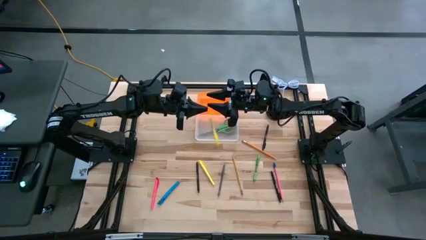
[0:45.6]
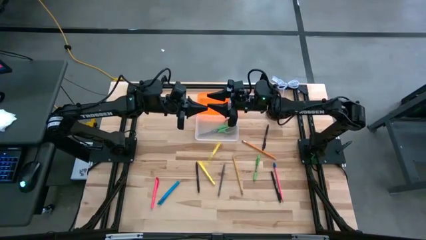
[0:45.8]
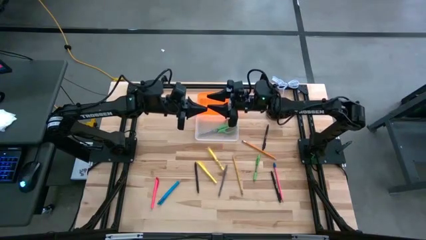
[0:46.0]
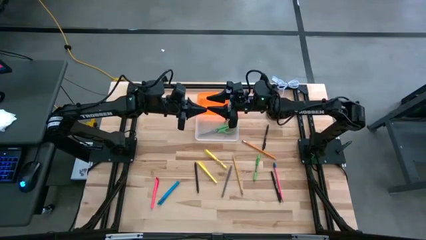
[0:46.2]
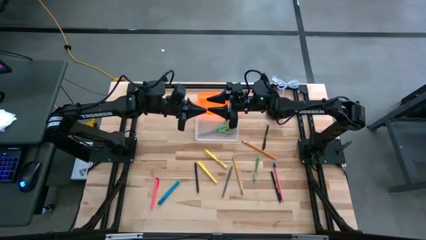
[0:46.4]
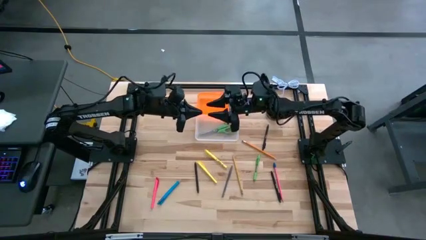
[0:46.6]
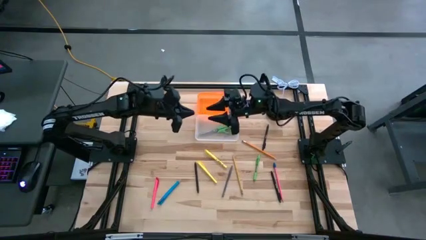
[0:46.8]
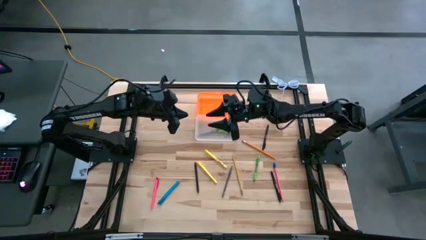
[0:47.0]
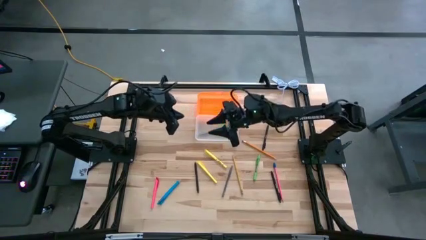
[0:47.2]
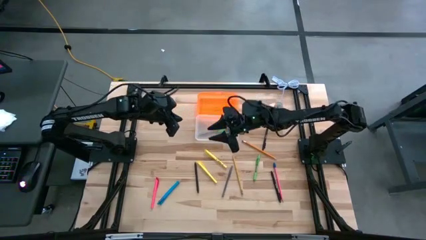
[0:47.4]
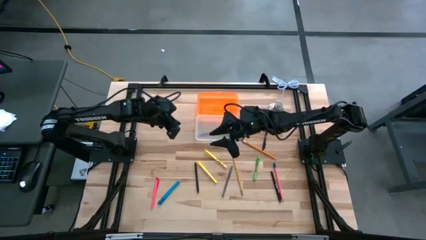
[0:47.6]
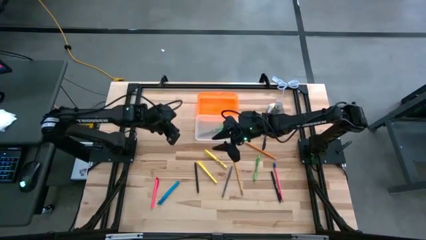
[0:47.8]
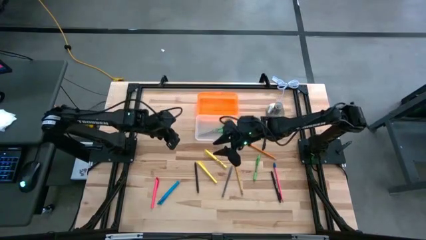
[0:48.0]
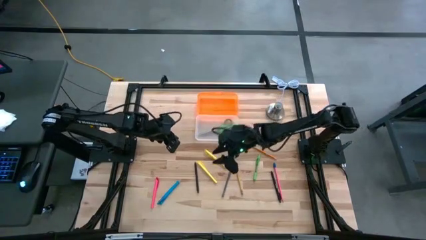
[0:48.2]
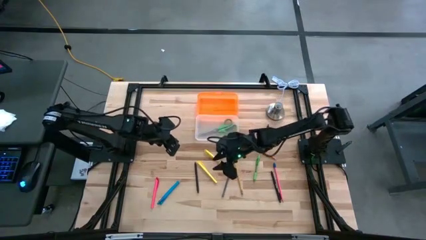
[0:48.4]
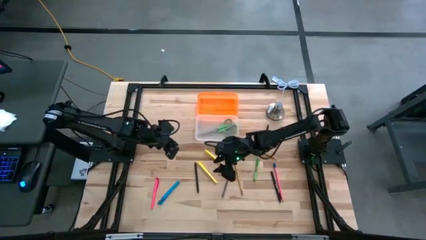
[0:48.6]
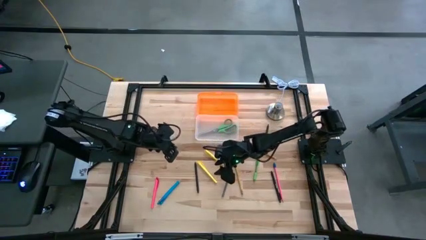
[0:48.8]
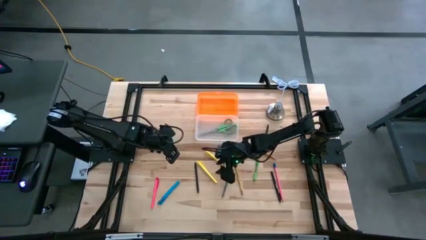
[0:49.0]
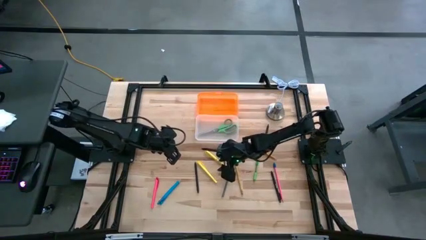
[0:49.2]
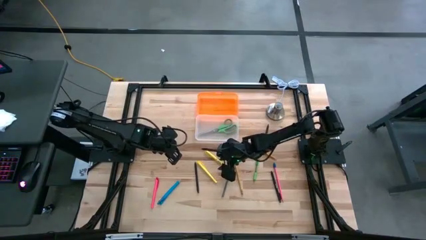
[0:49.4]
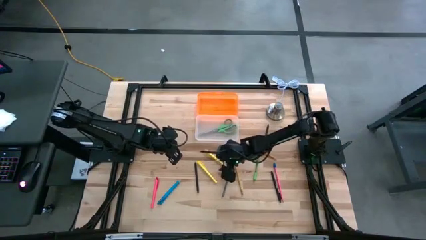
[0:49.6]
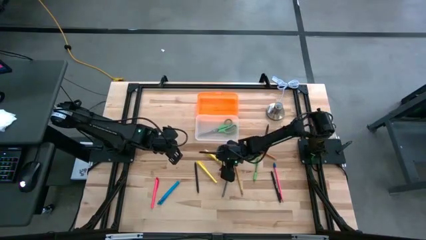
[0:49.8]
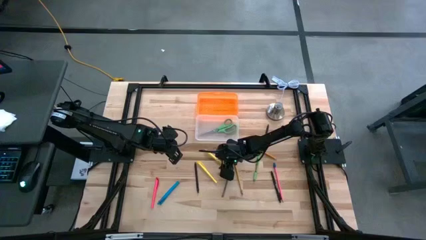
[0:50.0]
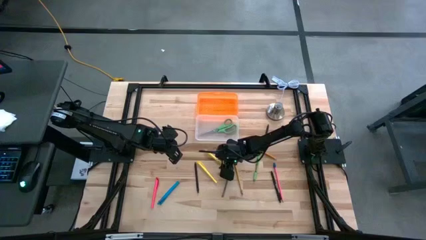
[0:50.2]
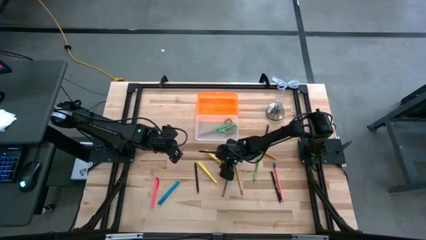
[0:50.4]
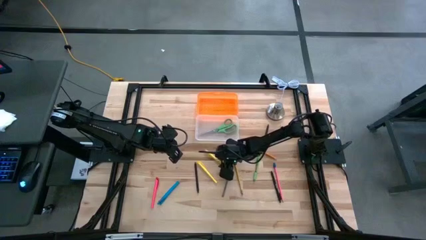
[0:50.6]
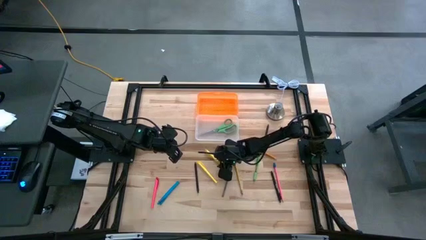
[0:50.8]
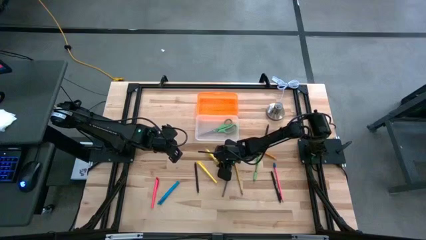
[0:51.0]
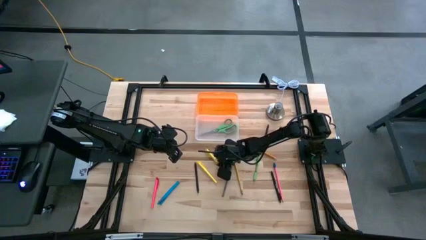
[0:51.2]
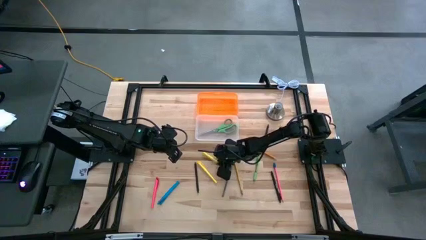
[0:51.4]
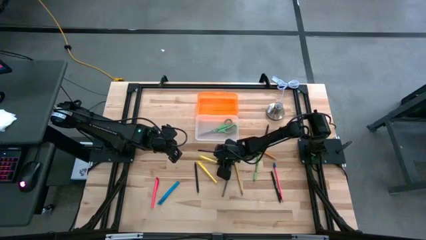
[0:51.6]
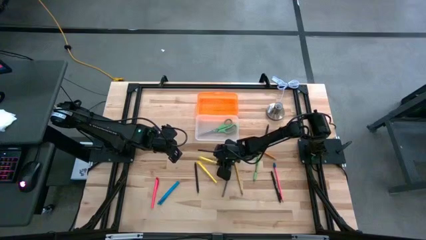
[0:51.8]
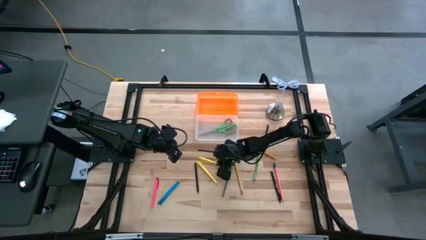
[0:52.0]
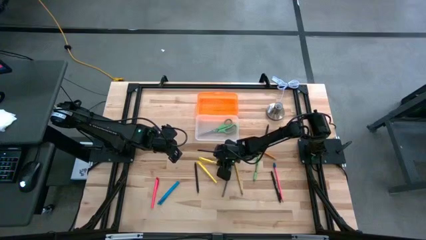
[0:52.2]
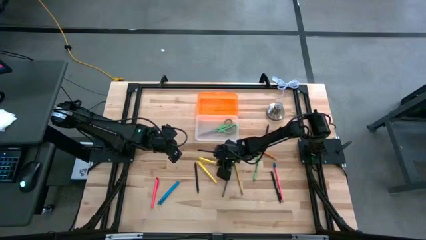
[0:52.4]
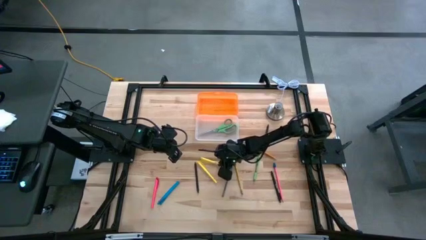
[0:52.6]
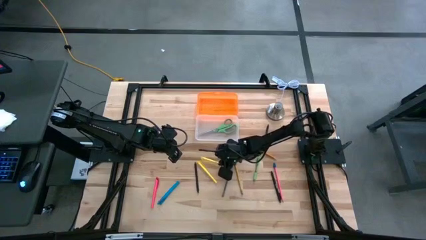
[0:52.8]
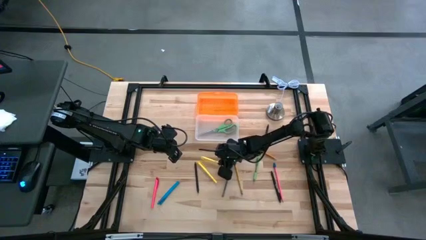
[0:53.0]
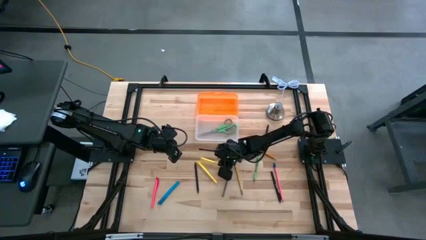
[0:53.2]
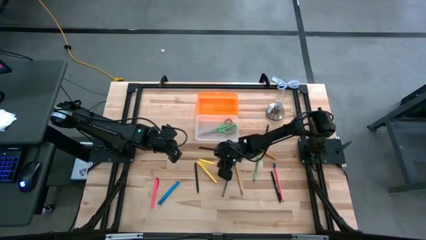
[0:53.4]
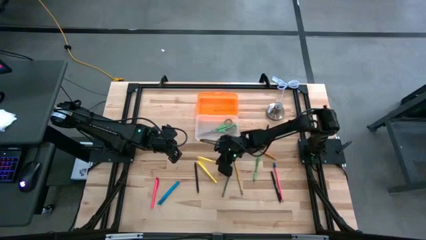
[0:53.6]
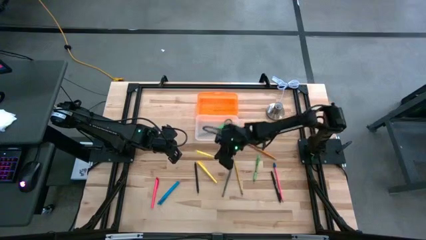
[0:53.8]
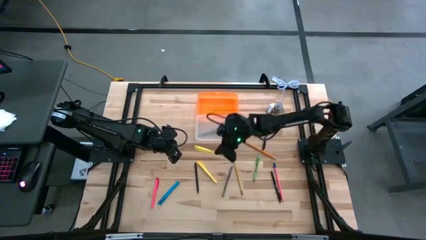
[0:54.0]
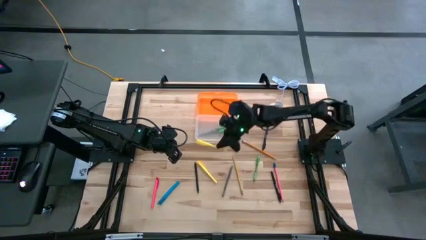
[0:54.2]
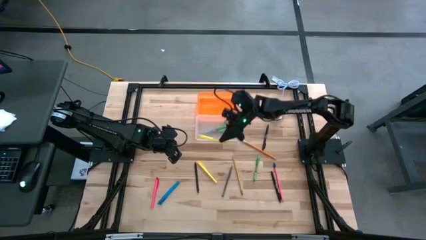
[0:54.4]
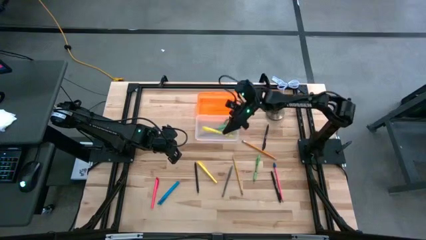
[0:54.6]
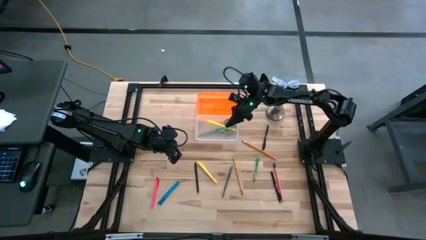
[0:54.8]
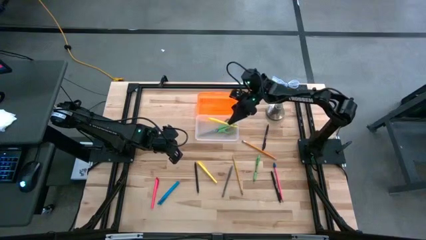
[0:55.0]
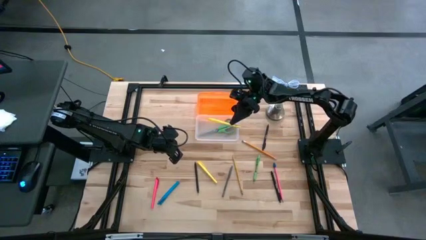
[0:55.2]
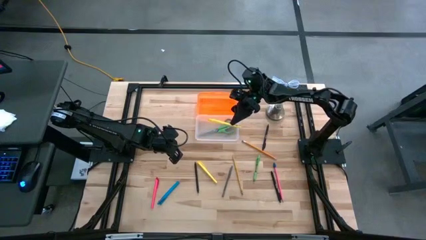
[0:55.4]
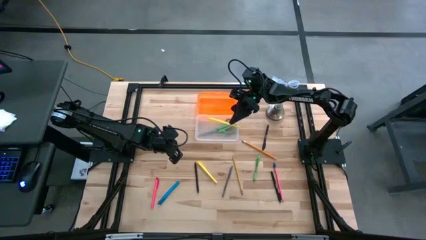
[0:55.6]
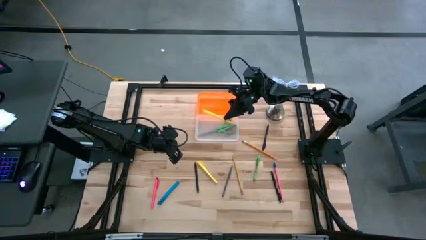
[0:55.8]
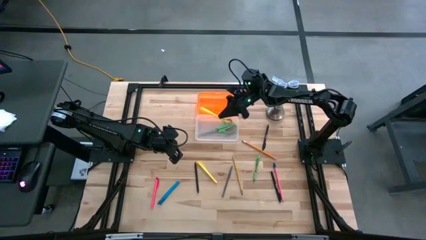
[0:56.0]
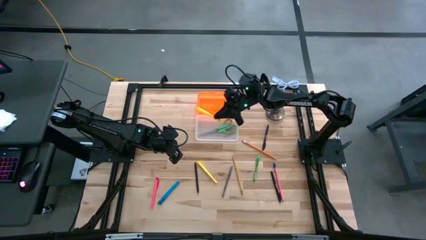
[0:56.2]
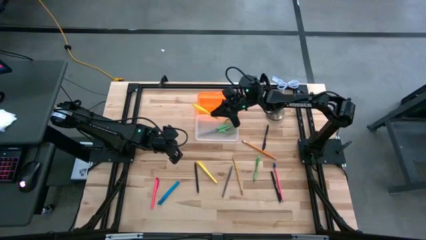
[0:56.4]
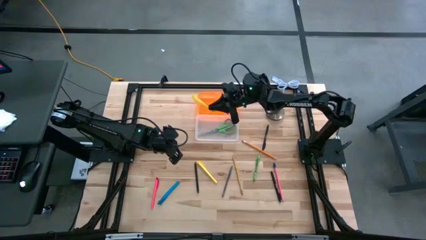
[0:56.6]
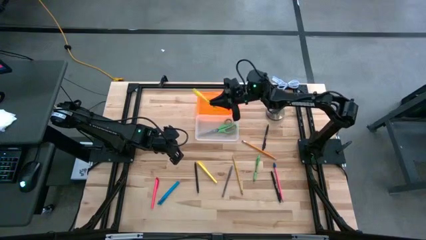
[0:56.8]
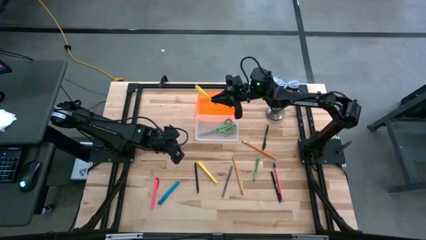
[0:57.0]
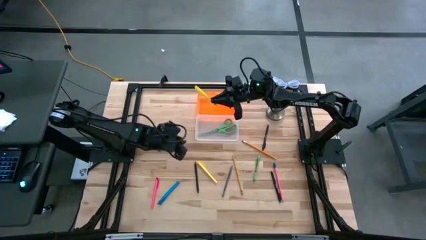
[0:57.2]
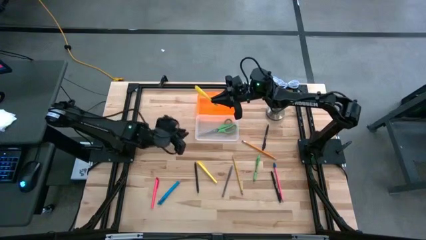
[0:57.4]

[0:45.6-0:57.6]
Task: Pick & place school supplies into a supply box
Put the top yellow pen into the orange supply box

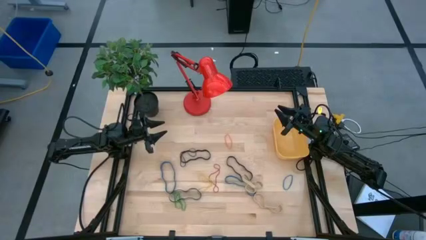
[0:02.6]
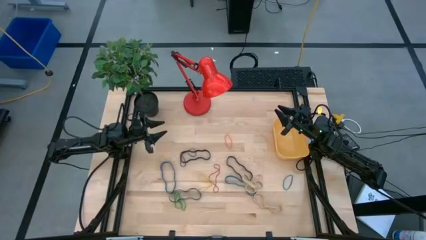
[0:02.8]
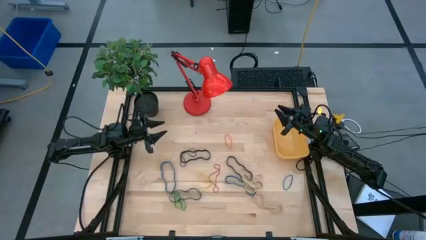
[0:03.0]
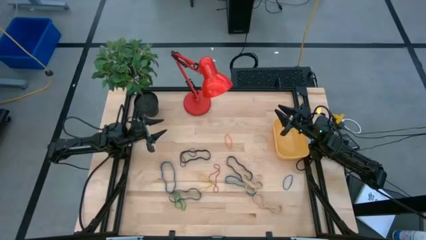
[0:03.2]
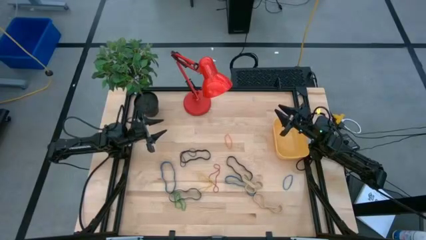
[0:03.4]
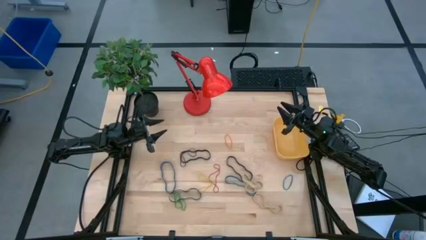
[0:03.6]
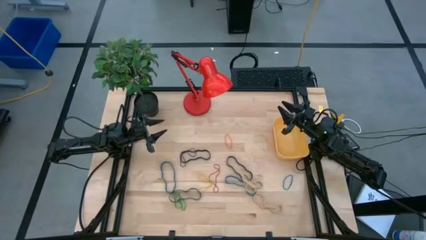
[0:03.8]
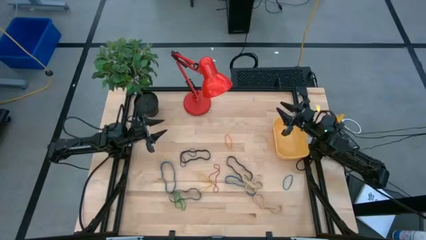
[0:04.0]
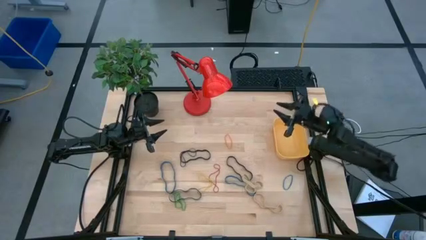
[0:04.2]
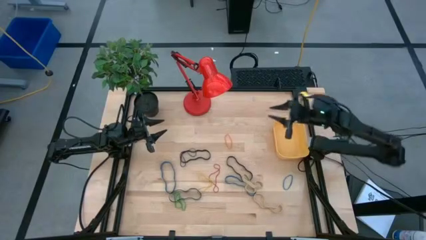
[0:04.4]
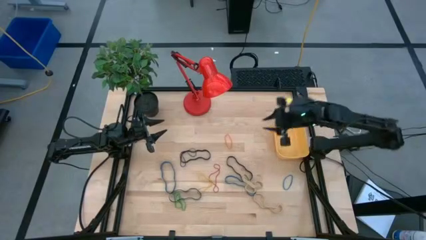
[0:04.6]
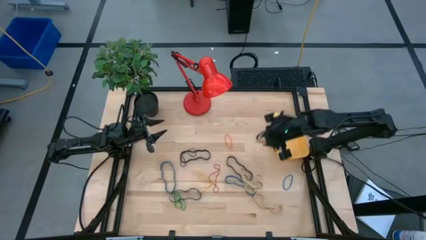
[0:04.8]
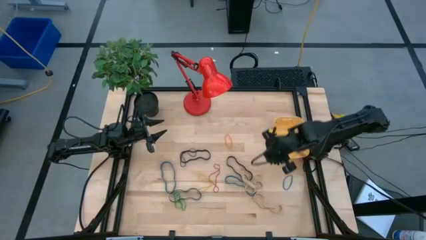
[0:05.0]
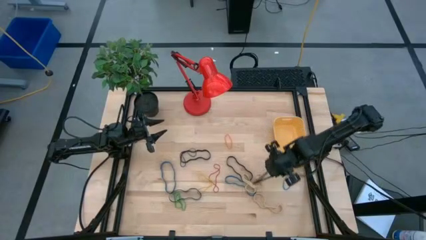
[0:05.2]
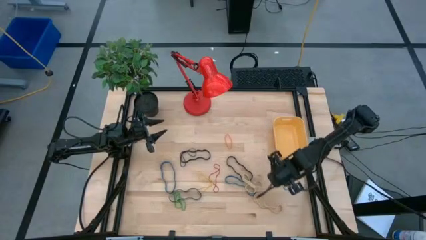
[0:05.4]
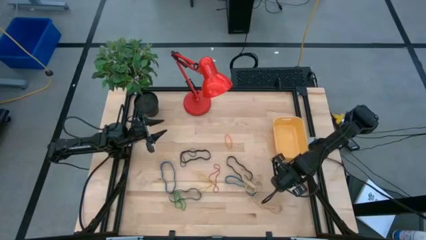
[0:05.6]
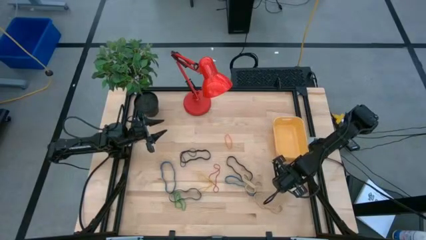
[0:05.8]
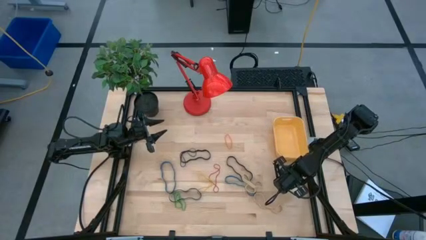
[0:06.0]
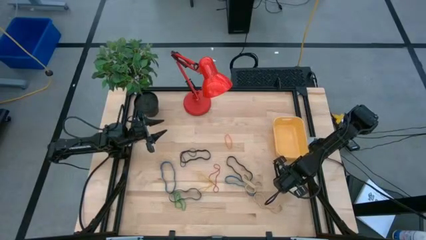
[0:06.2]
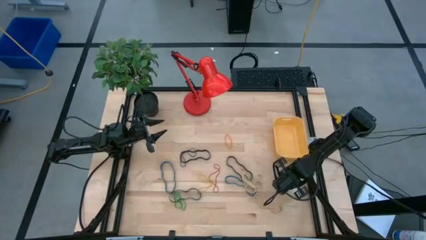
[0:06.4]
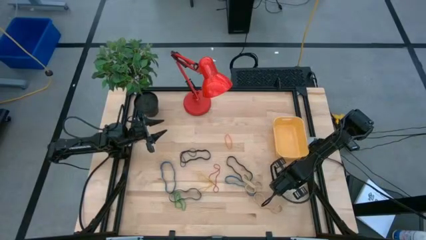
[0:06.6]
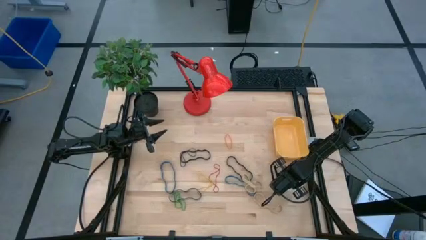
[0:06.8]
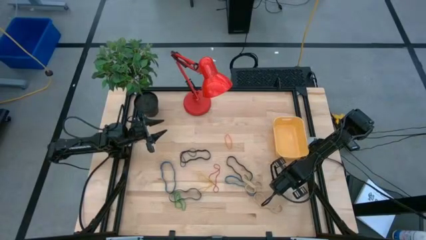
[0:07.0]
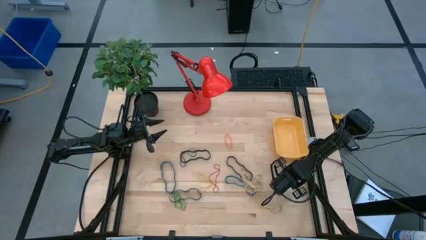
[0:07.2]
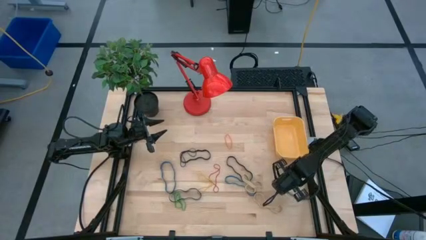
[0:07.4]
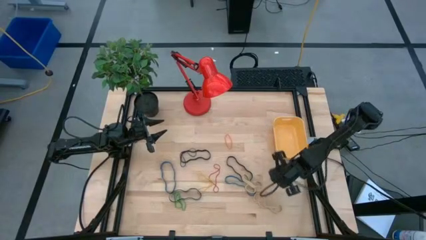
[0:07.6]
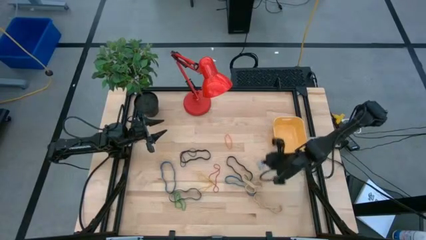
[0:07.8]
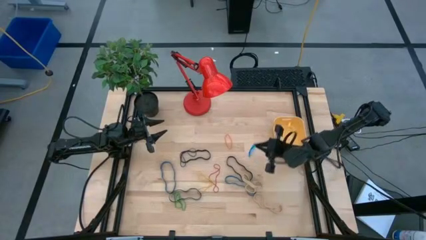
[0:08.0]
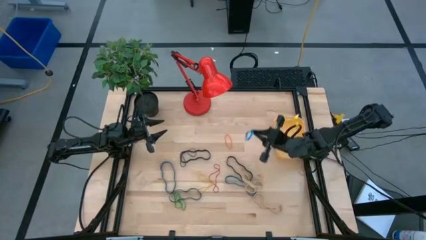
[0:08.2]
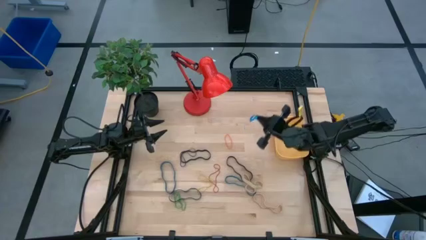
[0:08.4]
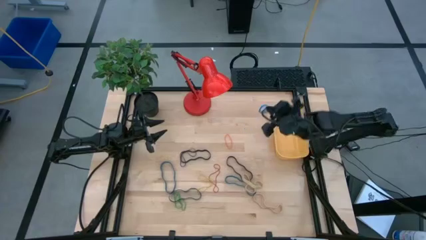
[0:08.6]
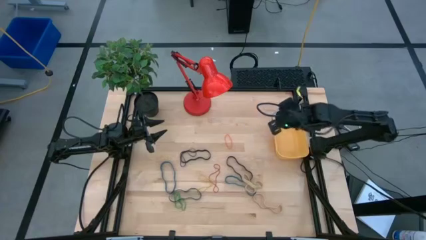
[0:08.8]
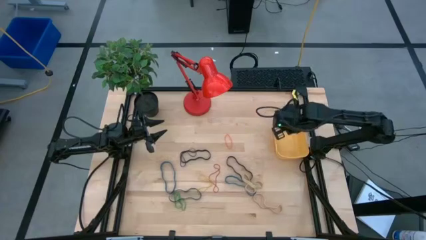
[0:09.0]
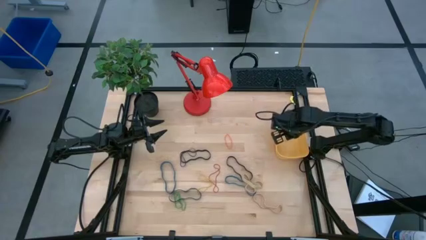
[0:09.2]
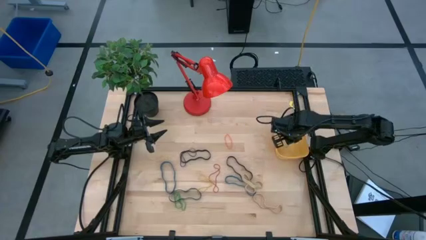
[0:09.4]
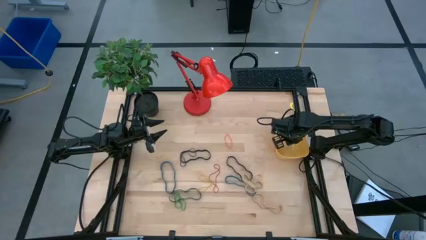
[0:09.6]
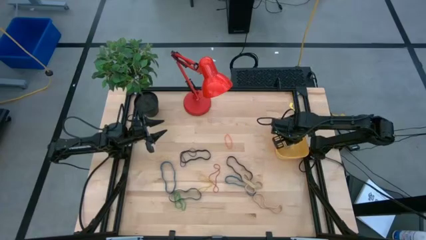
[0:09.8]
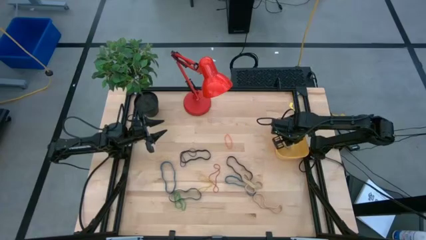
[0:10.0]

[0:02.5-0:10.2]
Task: Pick and place rubber bands into bin
Put the right blue rubber band into the yellow bin
